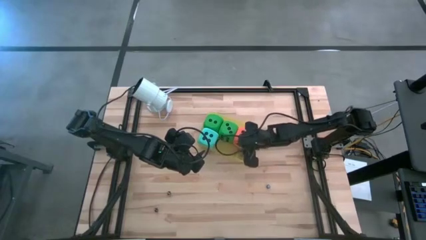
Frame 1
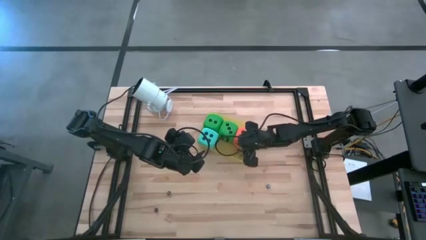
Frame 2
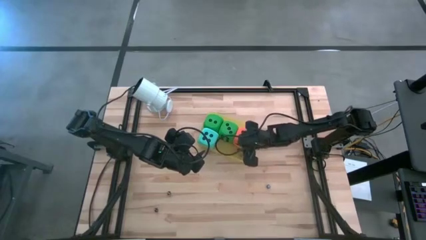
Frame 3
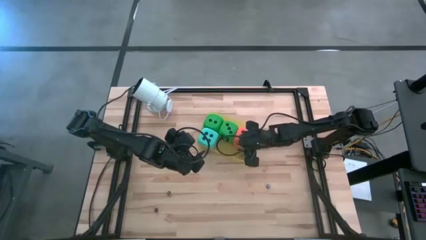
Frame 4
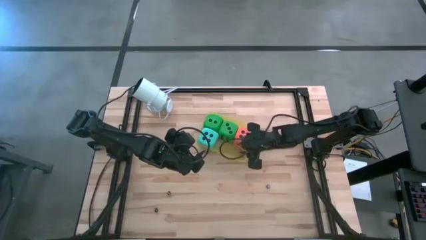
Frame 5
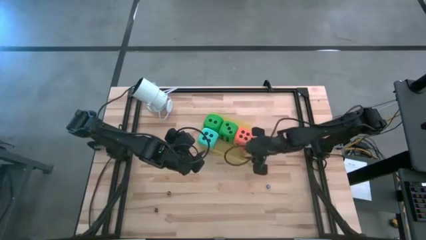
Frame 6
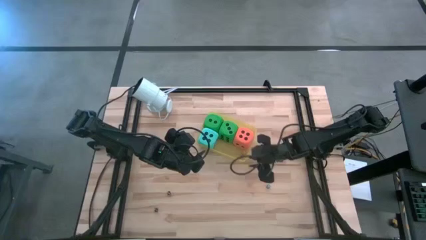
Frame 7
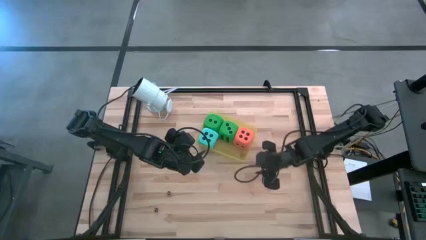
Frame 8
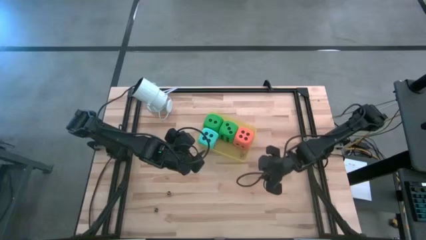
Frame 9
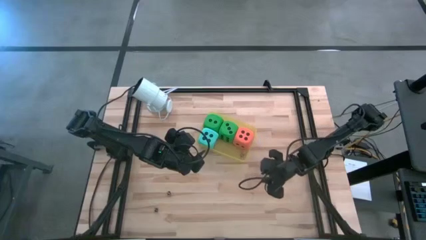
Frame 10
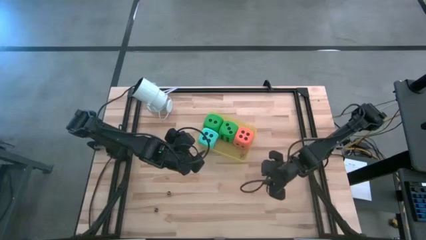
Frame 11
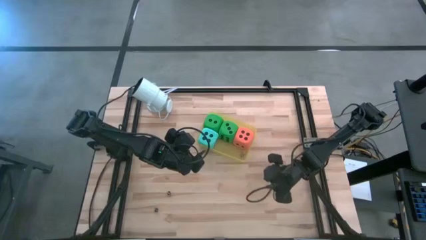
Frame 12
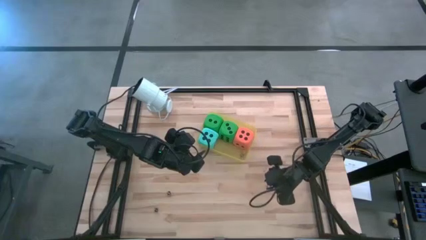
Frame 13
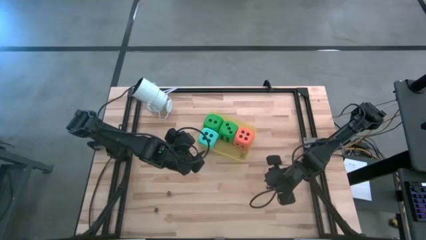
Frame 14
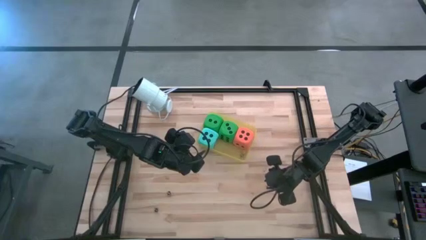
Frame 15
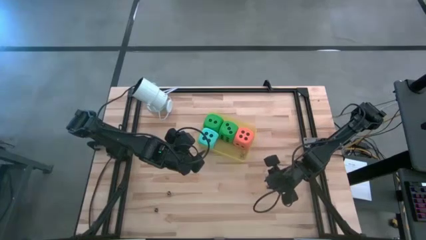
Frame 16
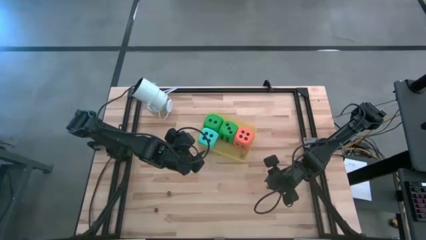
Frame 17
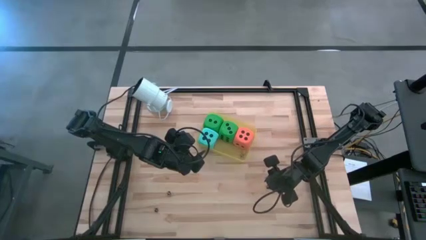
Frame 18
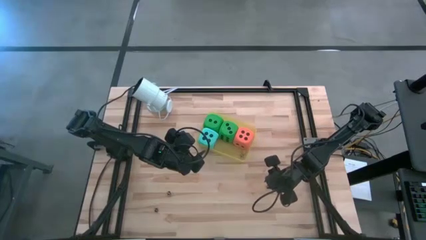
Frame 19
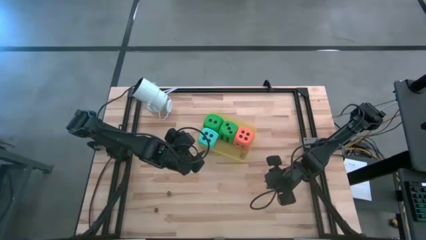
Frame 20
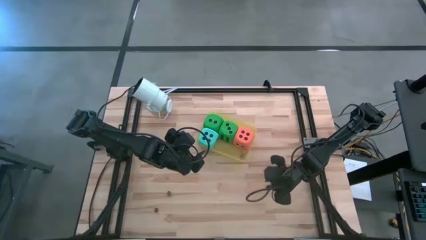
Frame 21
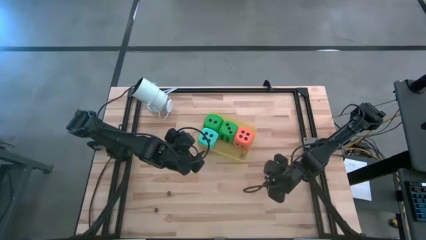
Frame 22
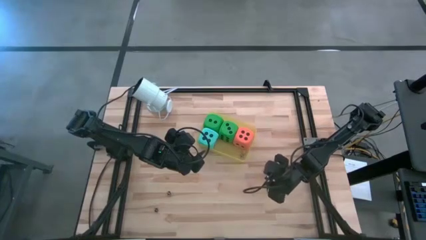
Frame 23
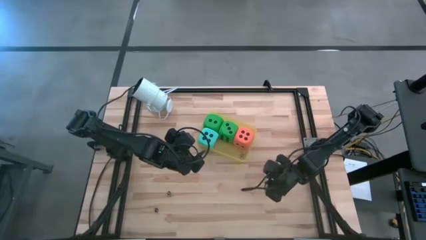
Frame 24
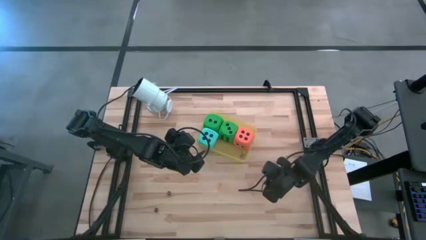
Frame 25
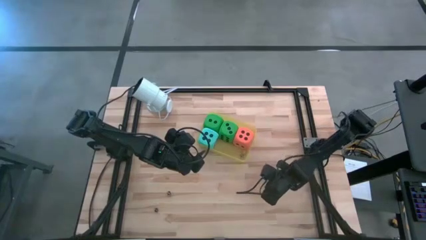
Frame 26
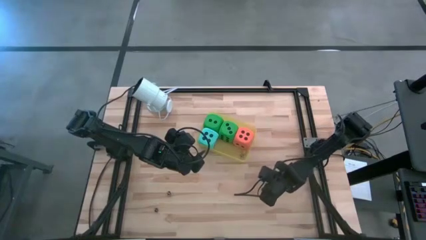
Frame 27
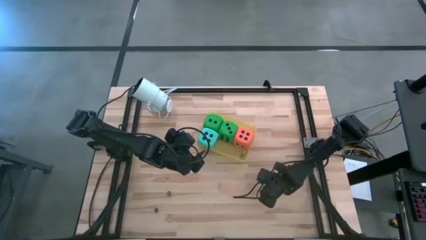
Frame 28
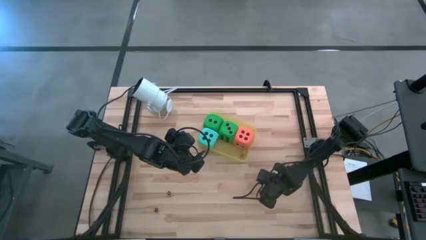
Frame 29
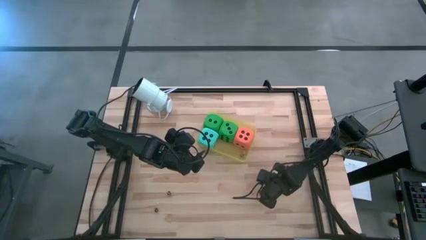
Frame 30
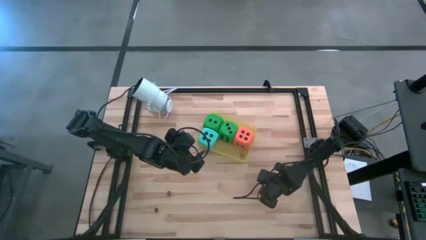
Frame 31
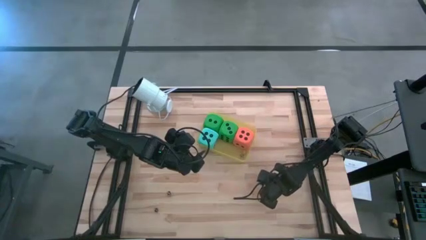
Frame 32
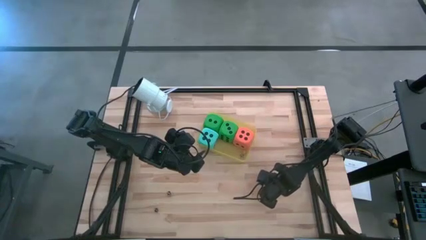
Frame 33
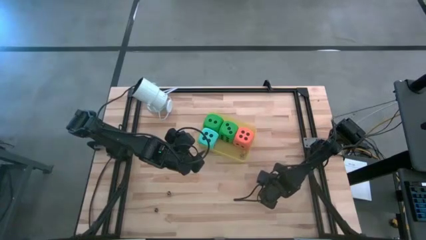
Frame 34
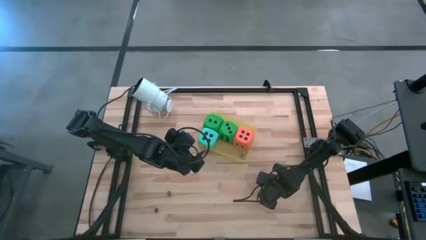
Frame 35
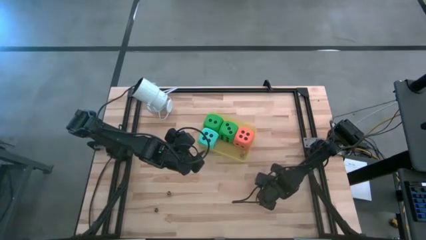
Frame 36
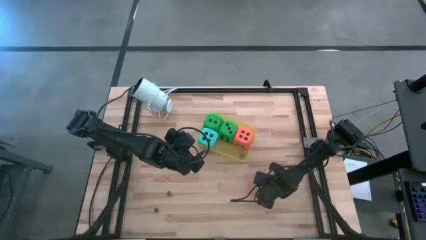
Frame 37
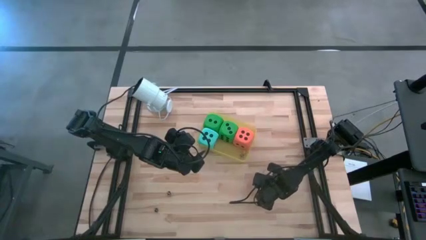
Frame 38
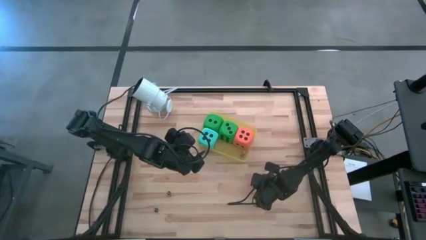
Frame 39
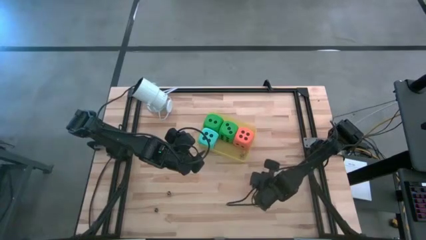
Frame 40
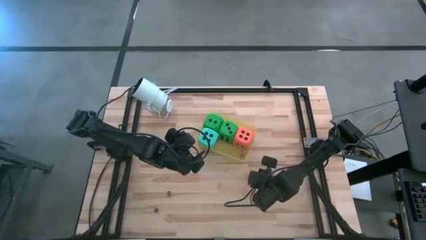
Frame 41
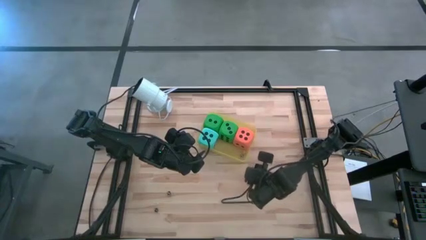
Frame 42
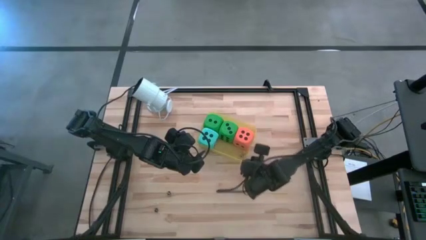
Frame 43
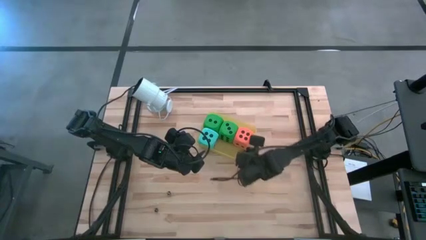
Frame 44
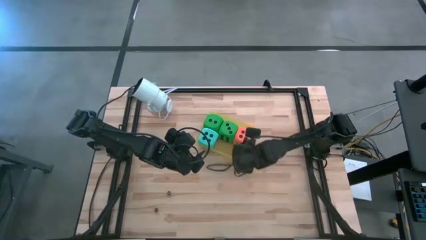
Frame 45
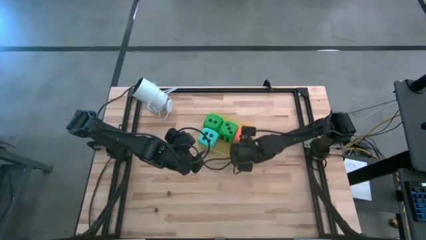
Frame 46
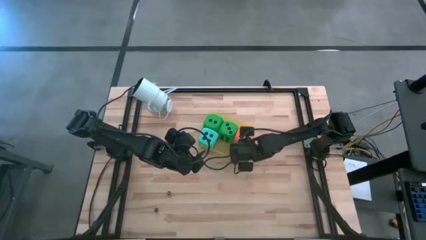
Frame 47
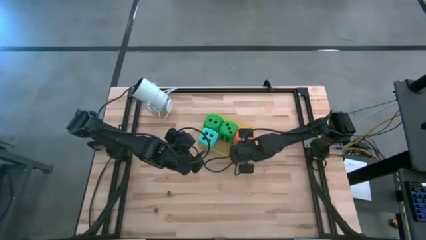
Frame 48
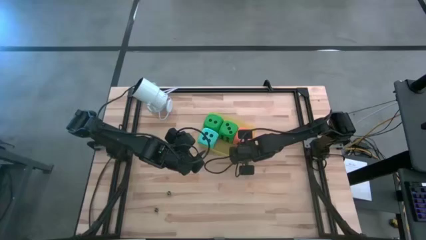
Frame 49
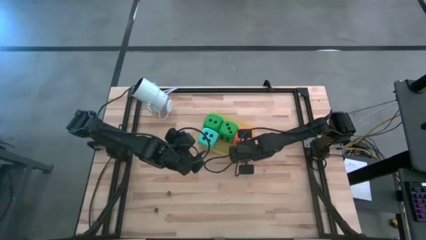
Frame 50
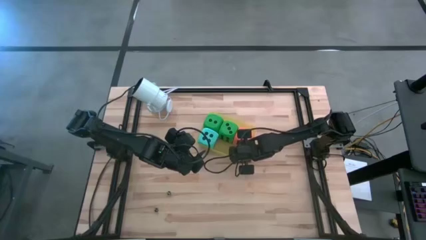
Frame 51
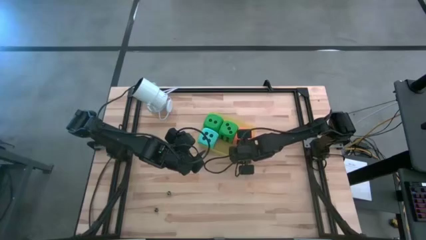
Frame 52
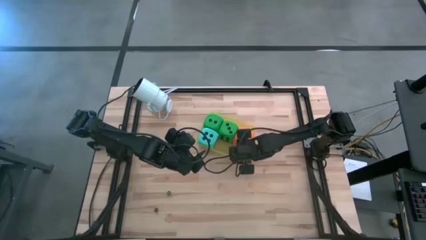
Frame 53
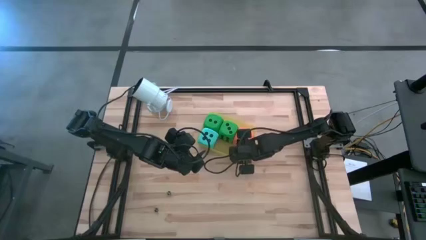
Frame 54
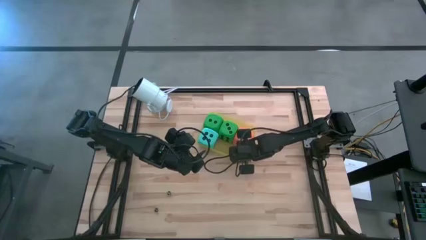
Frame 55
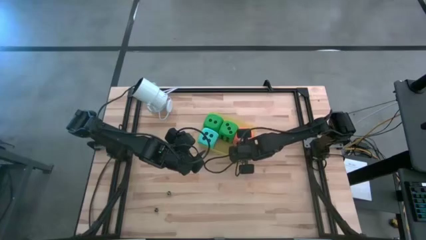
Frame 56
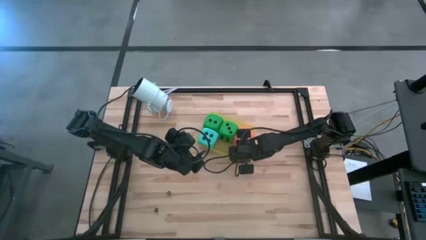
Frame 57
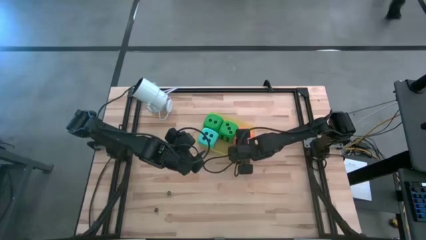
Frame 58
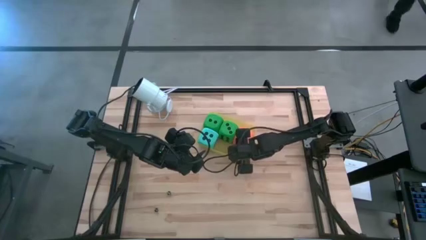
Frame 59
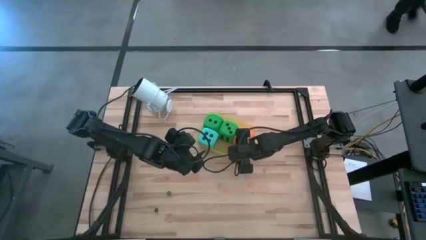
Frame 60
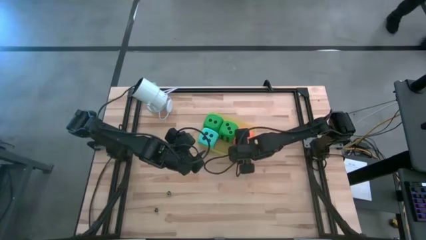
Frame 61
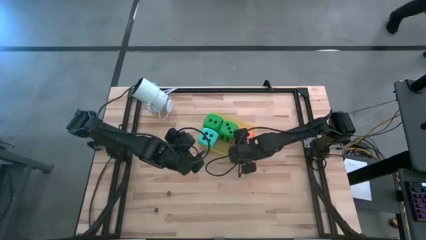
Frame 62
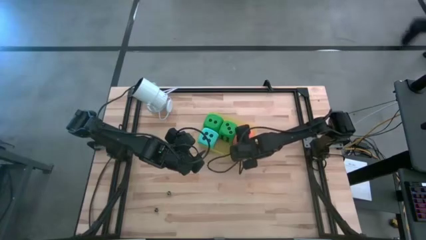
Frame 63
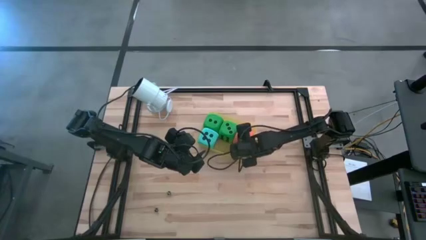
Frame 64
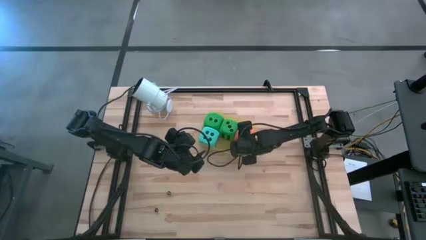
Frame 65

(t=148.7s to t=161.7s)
Task: Pick & Place Dice
Put the small blue dice into the yellow bin

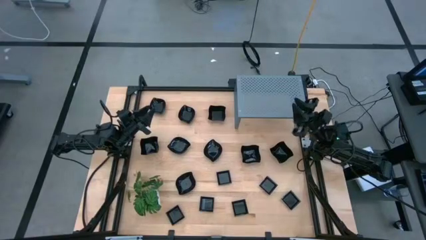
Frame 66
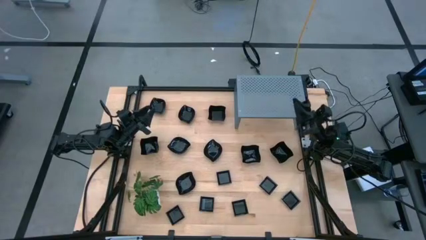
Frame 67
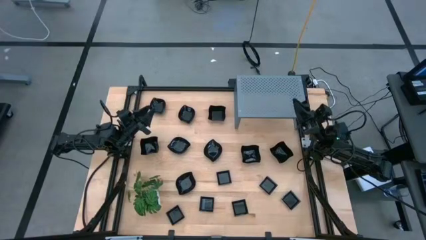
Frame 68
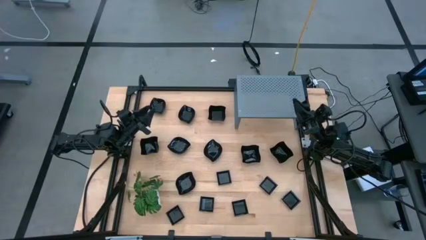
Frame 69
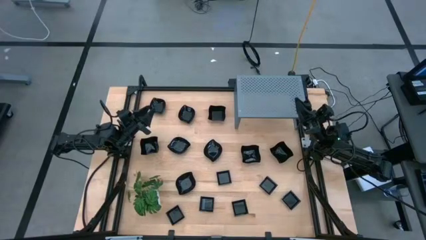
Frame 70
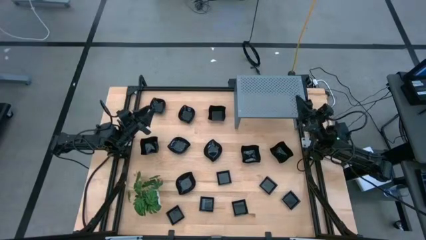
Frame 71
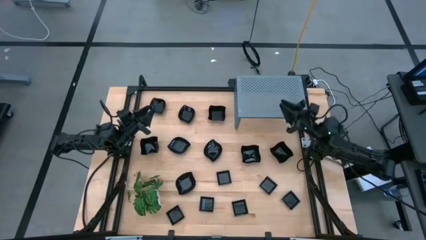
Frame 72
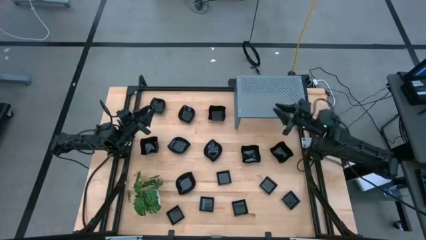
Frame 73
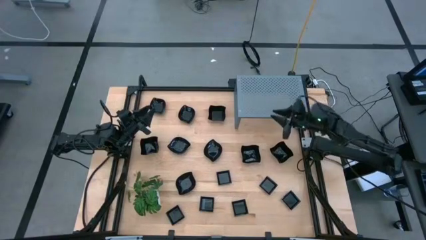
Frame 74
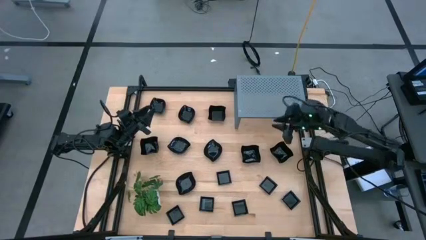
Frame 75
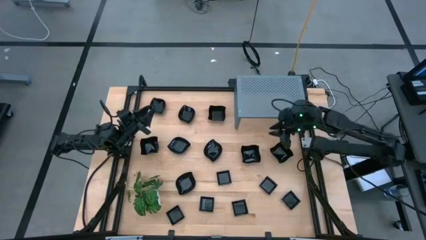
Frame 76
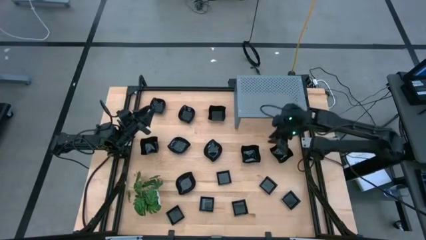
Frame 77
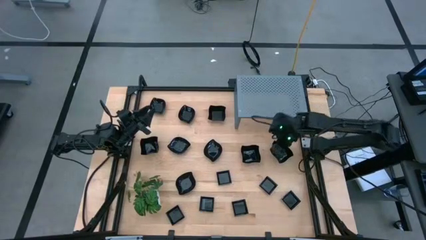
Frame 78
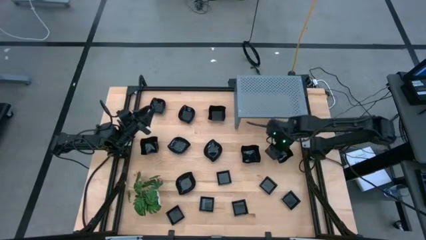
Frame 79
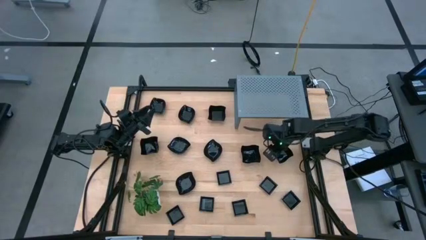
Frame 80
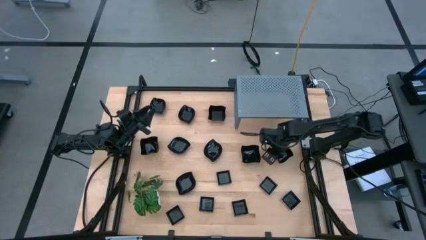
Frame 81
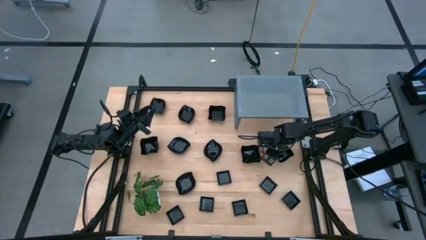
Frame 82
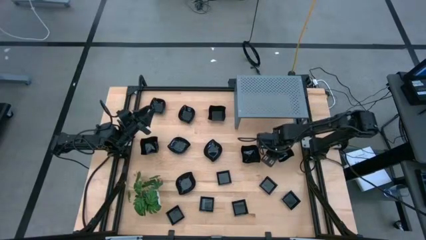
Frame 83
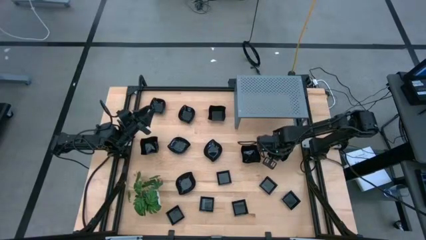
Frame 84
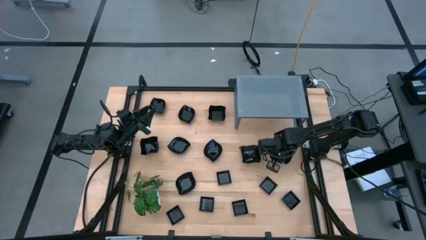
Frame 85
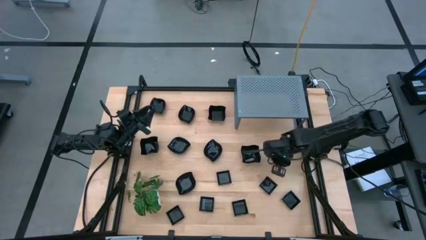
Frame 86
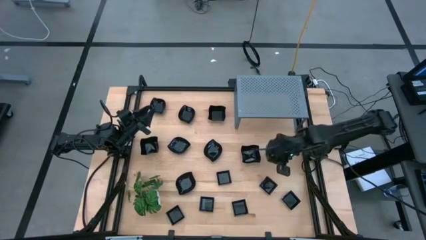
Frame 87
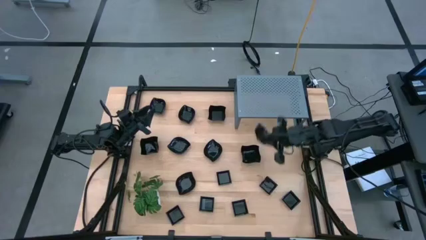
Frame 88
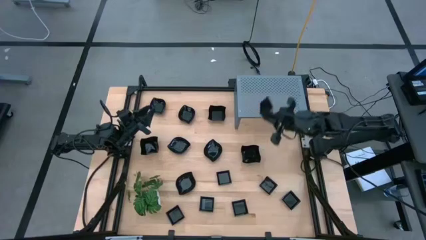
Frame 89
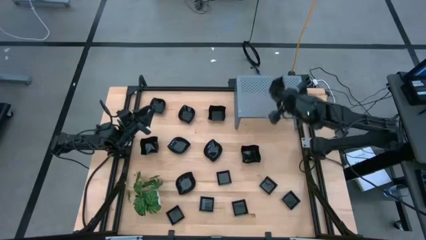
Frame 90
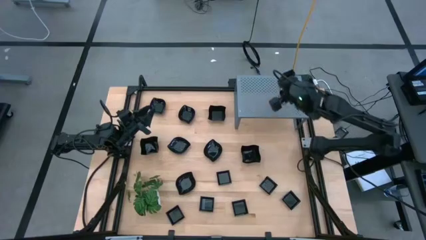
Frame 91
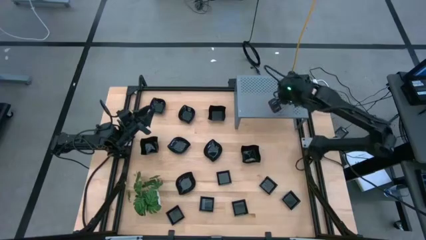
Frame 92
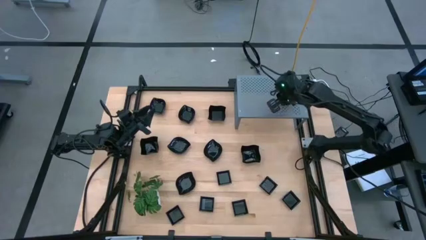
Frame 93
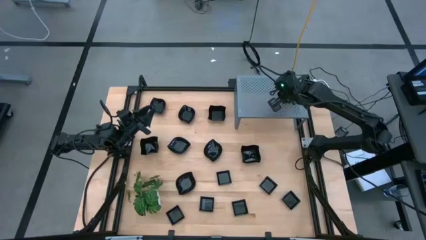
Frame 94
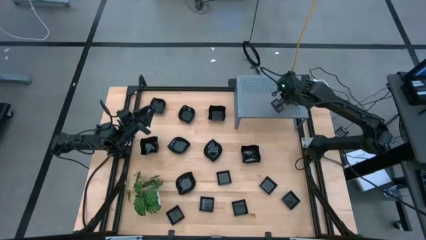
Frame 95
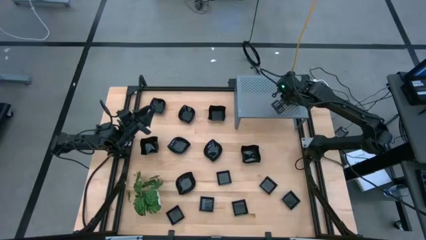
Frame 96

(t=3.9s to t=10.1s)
Task: Pick & Place Mini shaped plates
Put the distorted square plate on the shelf
